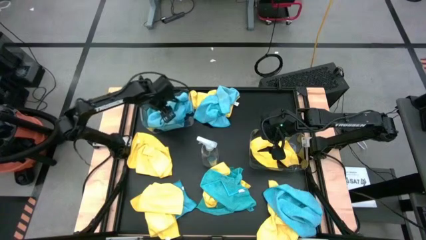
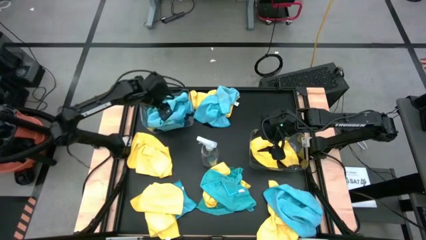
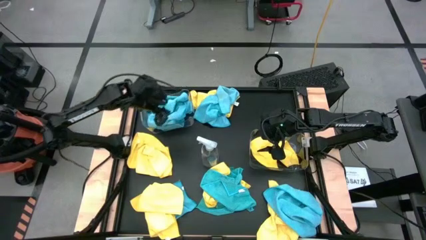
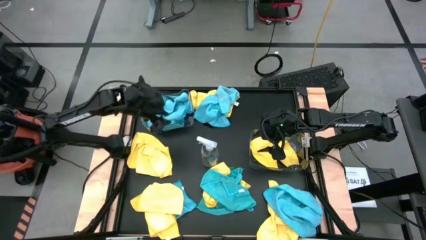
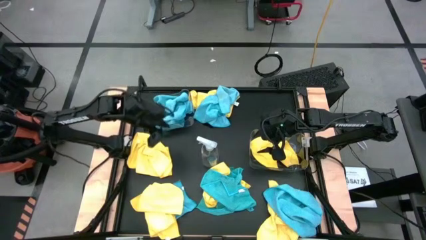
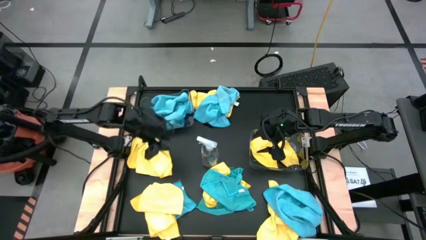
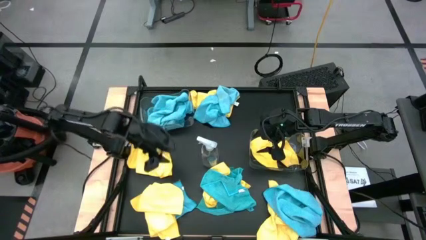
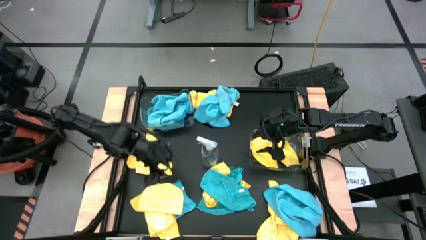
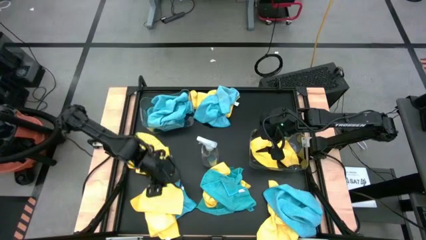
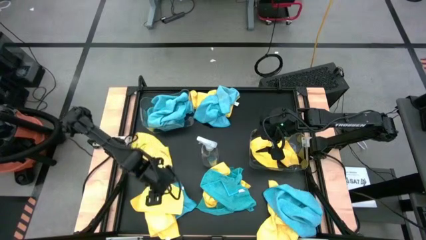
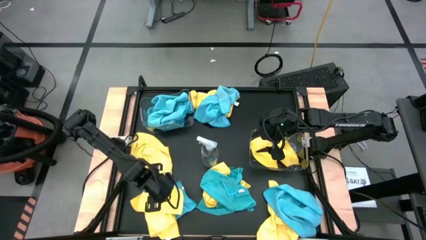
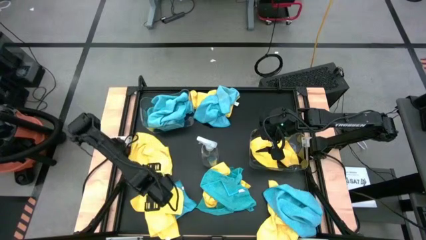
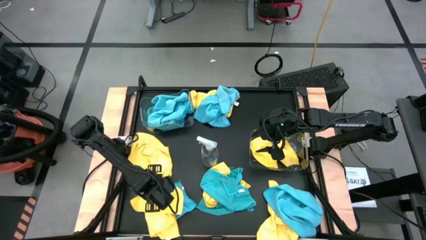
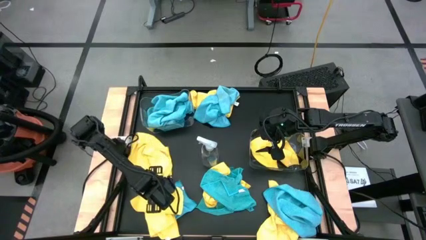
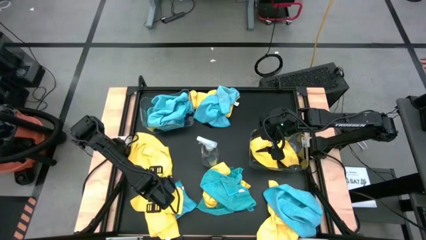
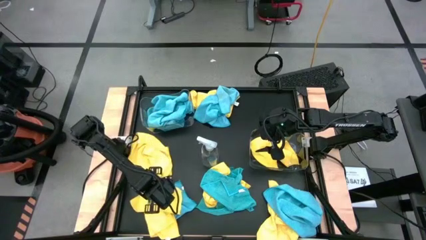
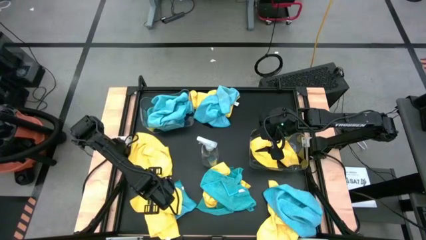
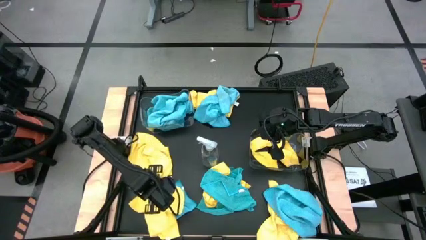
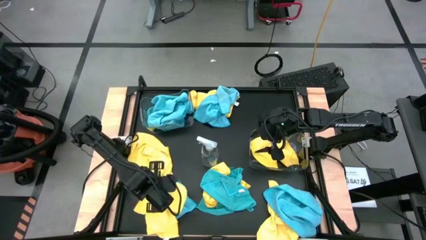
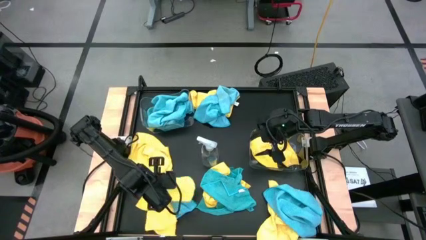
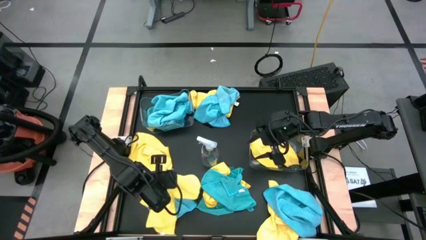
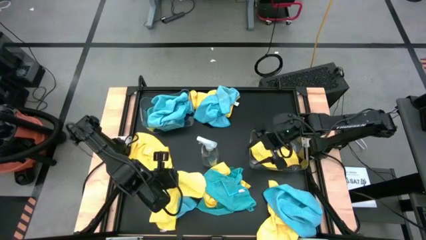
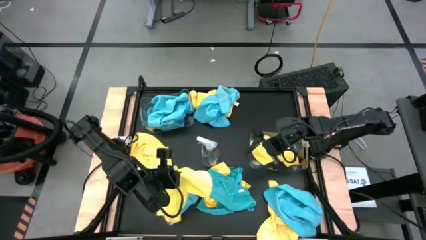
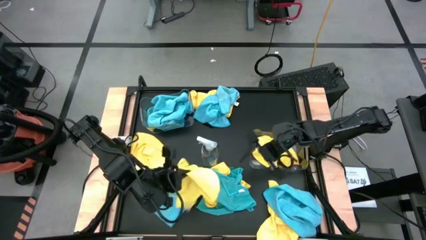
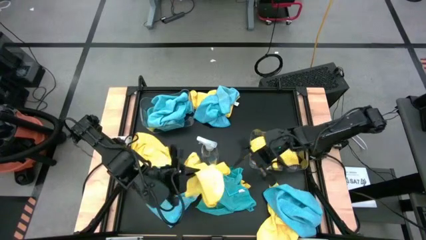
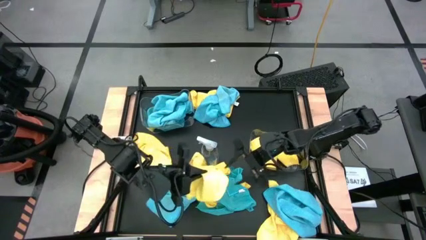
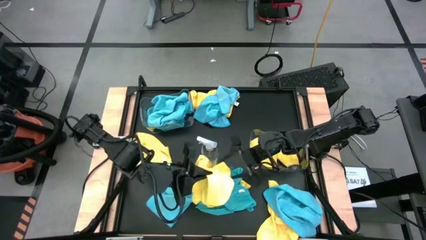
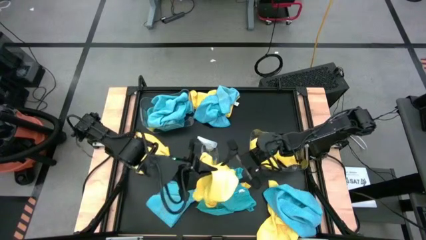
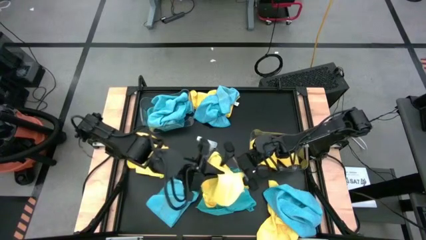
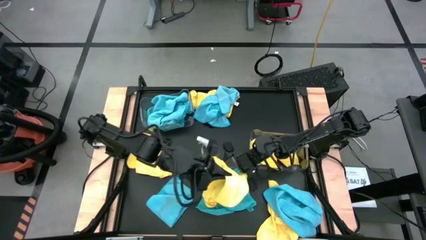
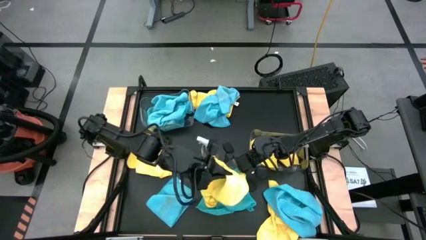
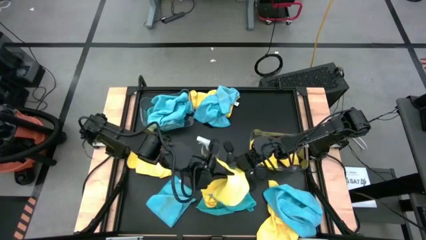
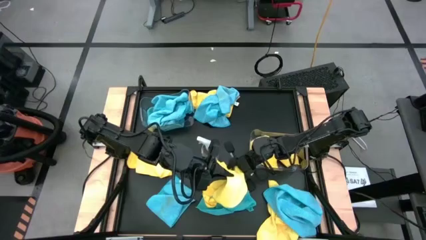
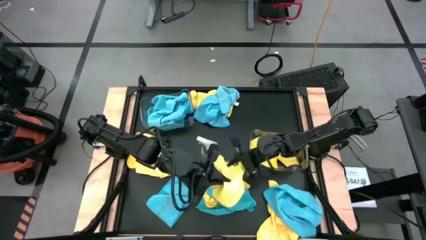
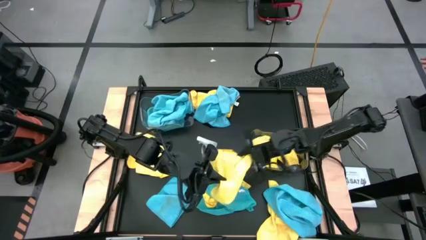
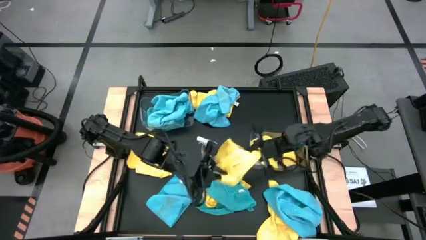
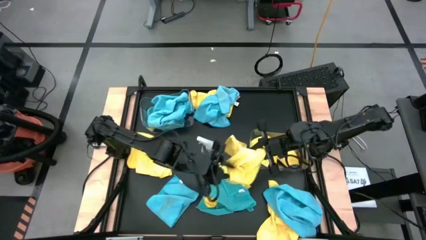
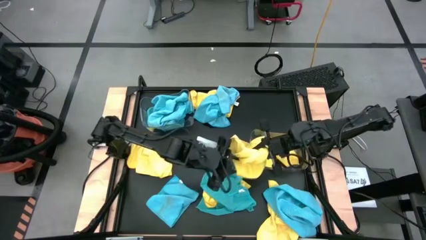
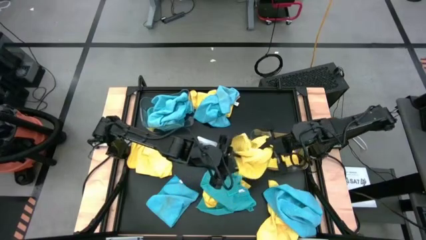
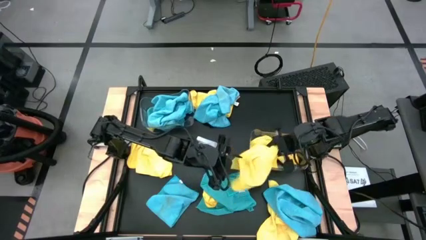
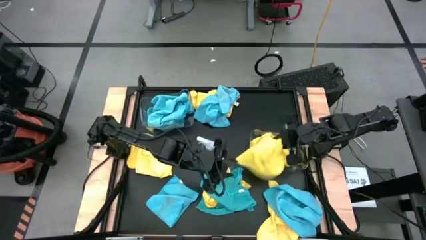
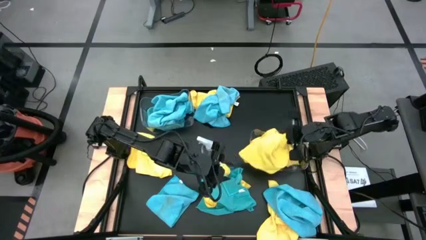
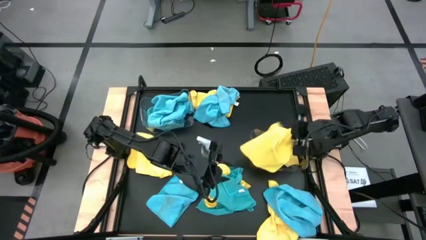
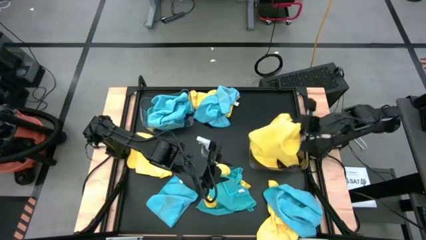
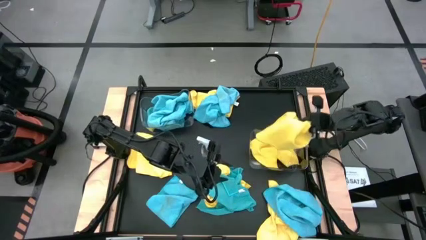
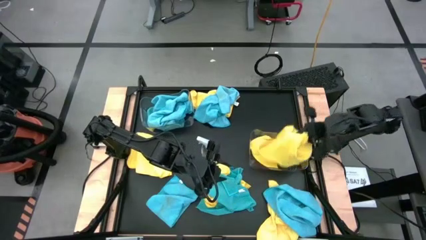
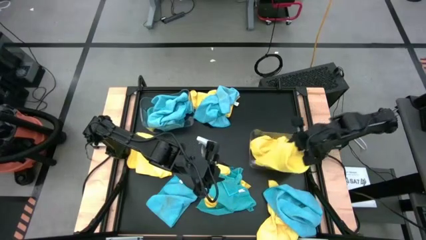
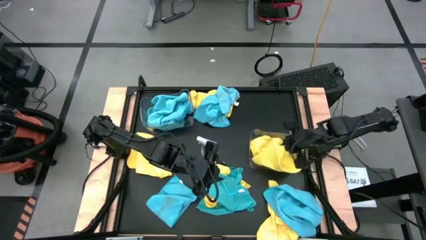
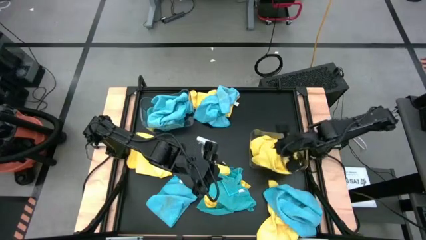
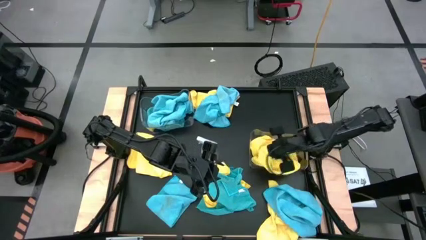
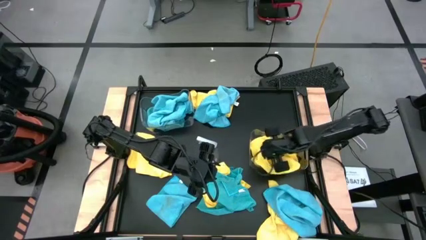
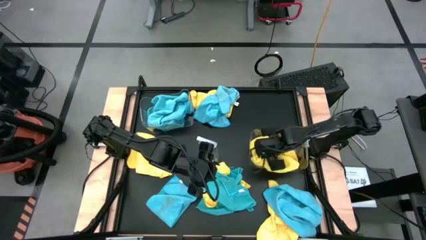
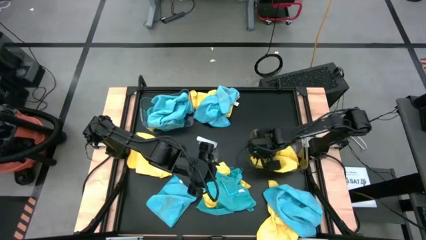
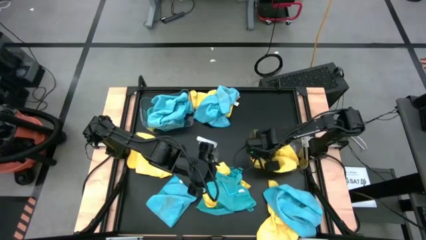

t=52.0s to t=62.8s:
Task: Sort microfiber towel by color & place in baskets
Put the yellow microfiber towel into the bottom transparent bin
